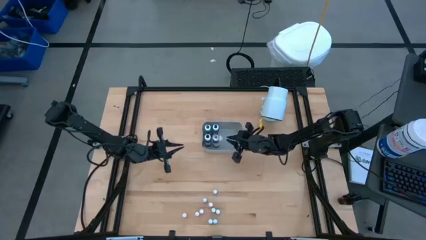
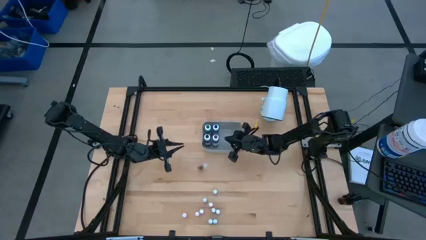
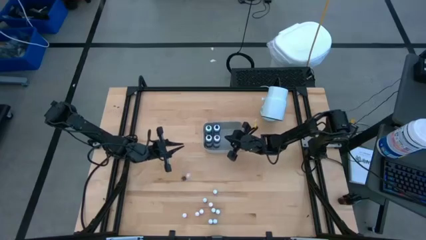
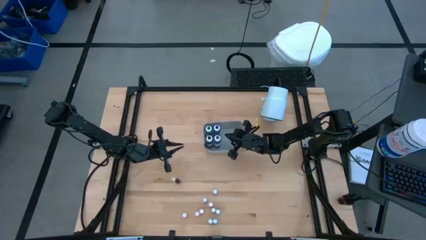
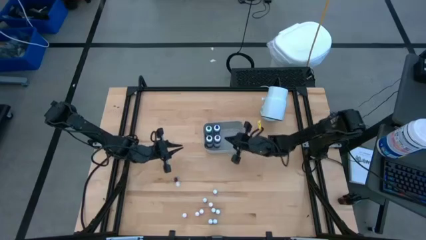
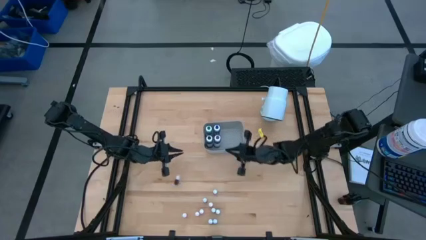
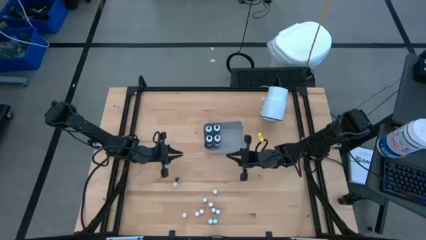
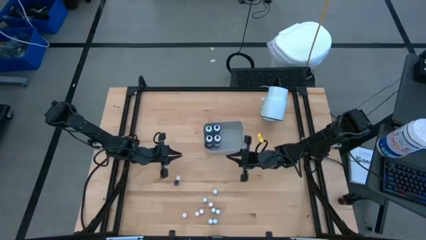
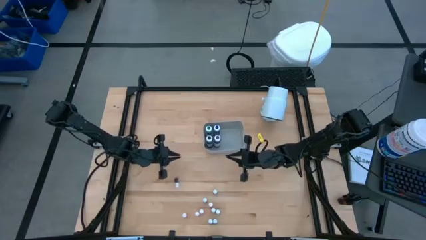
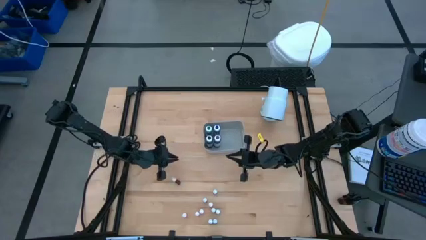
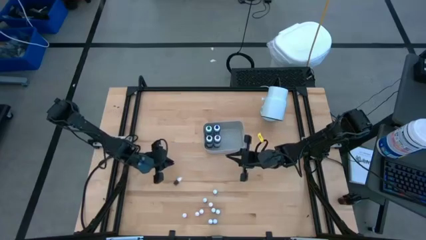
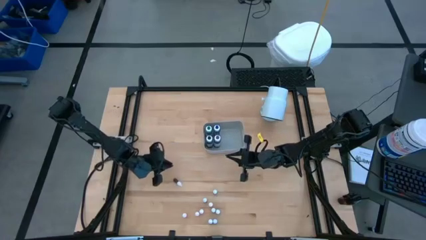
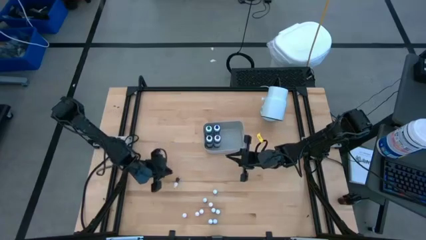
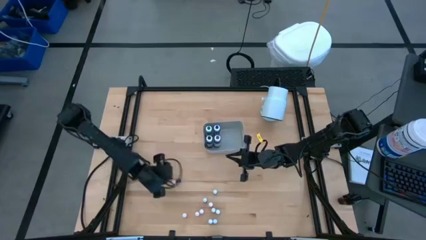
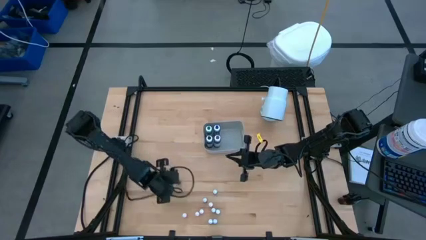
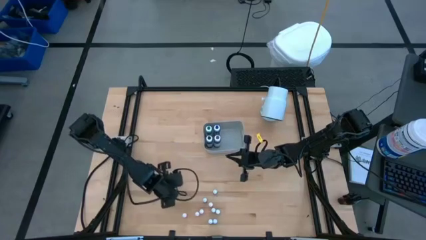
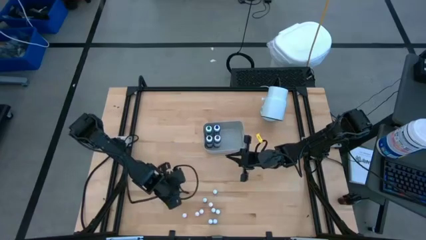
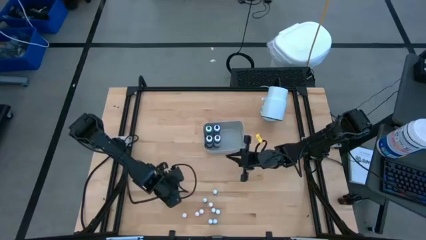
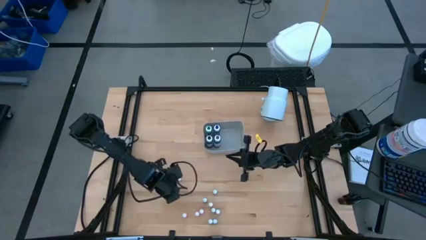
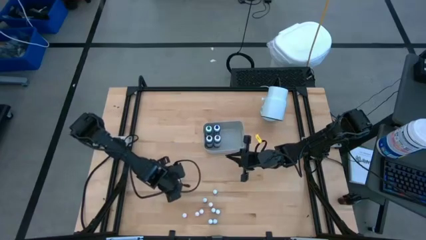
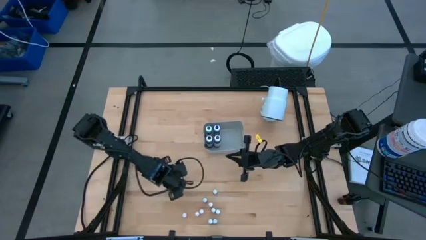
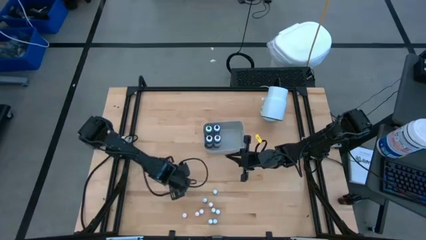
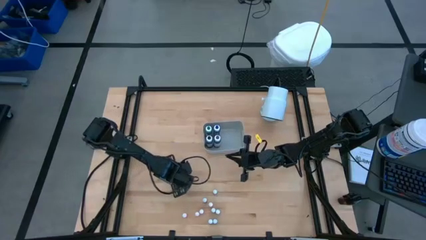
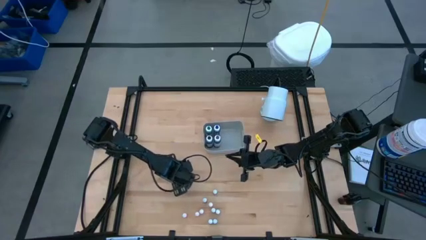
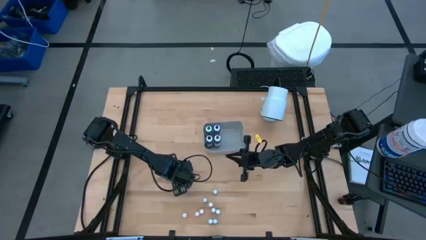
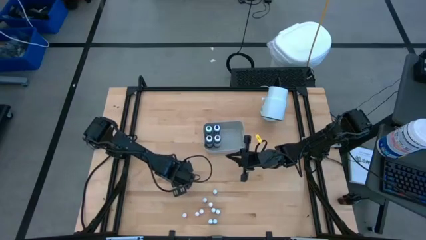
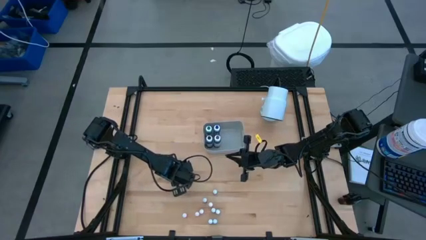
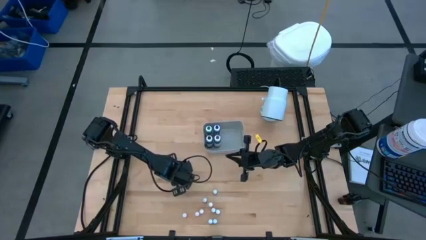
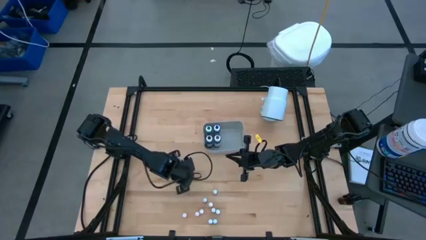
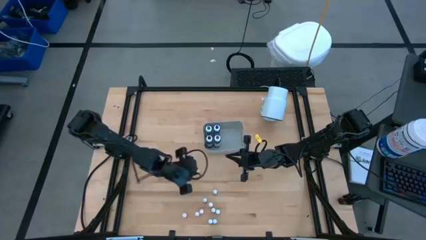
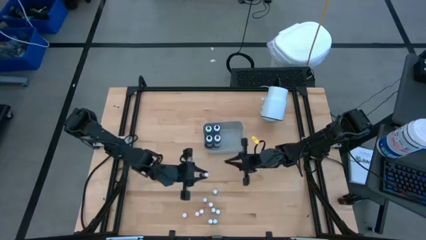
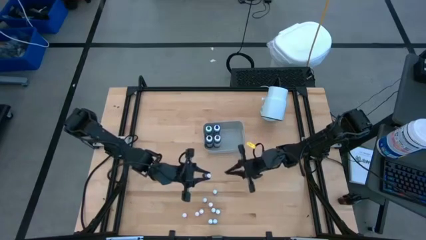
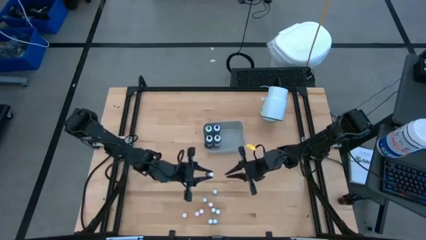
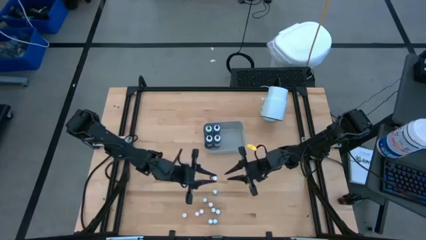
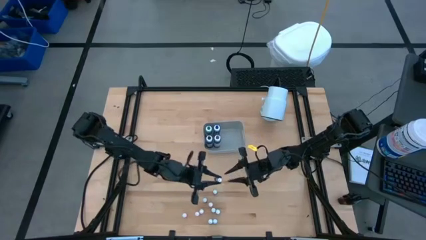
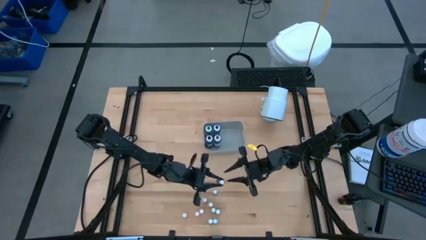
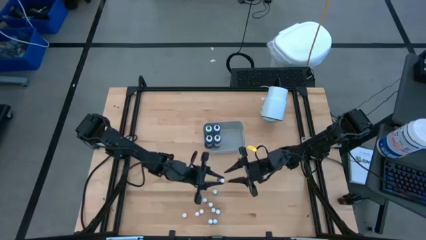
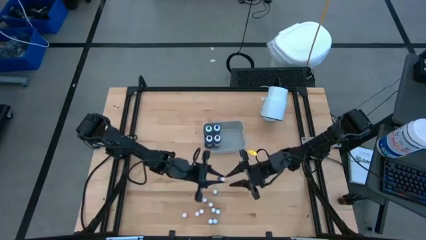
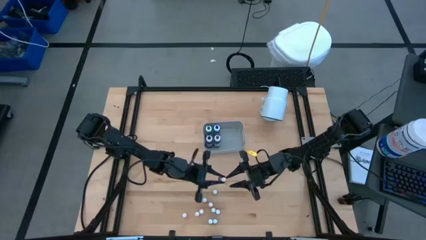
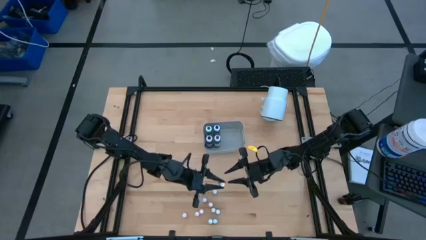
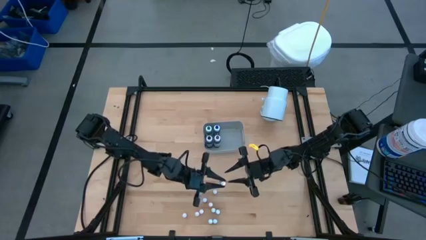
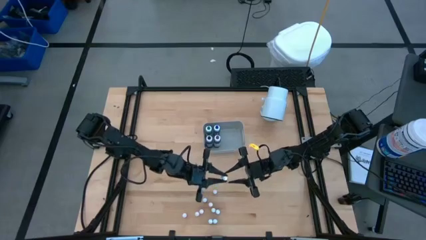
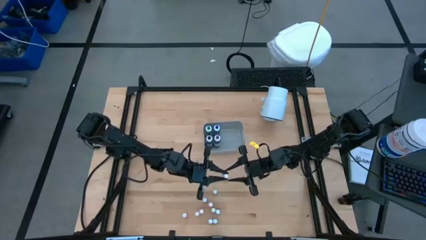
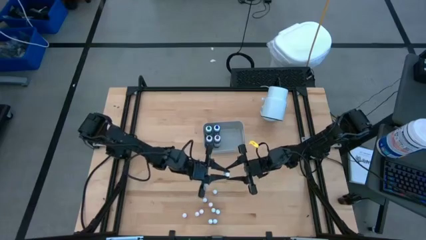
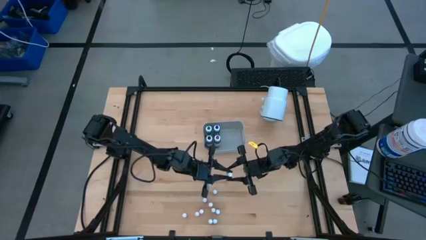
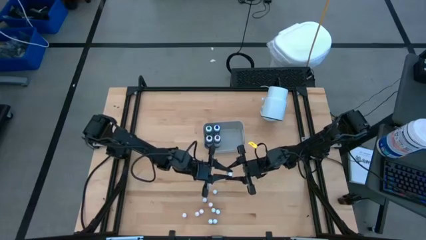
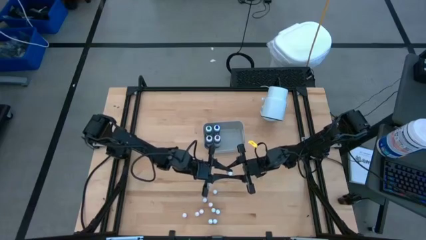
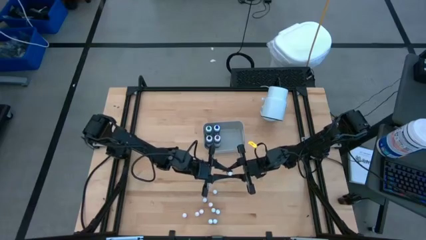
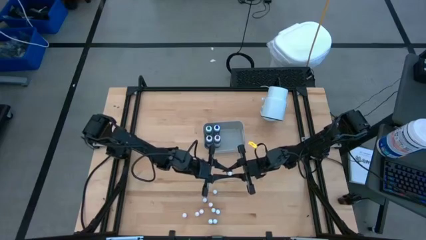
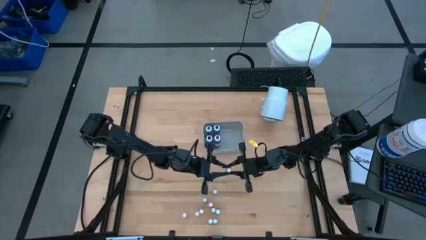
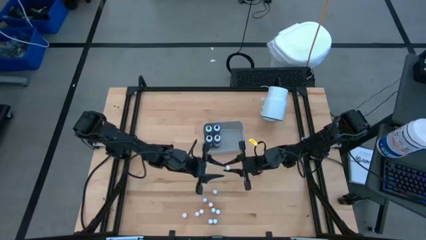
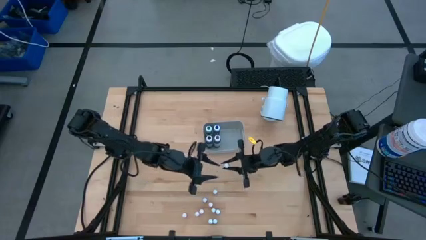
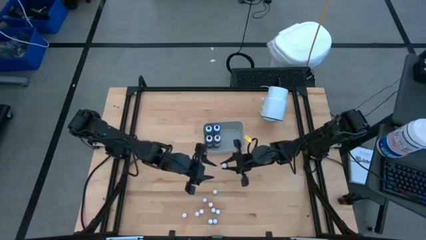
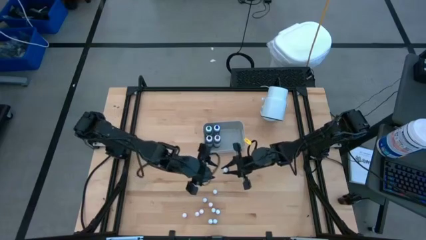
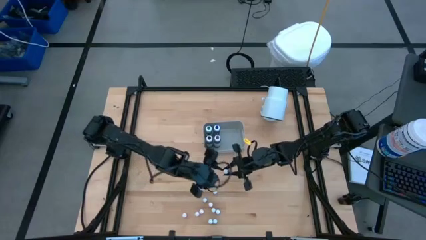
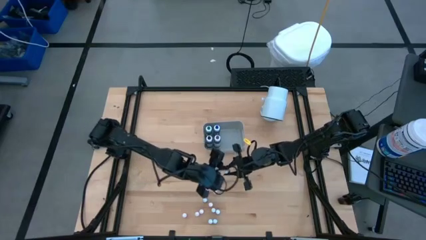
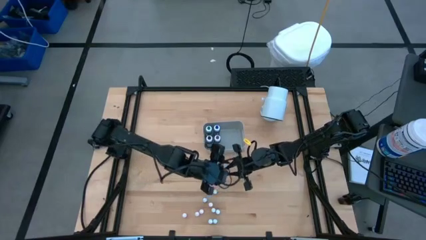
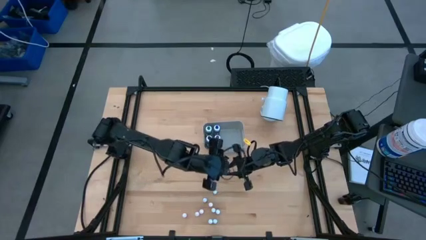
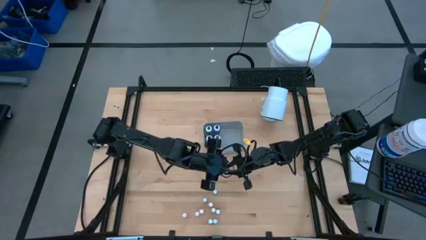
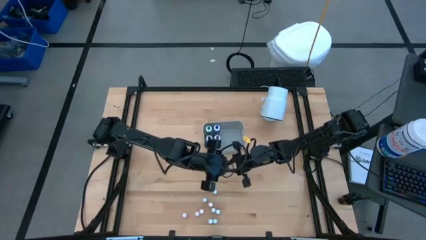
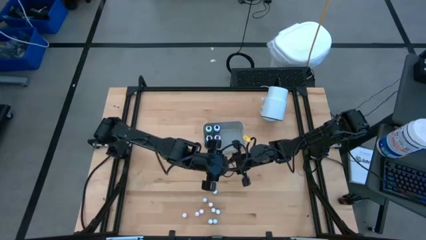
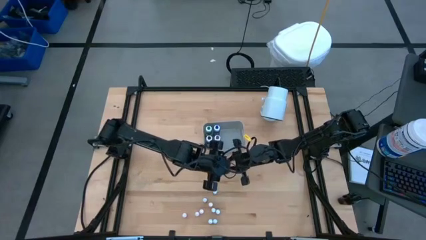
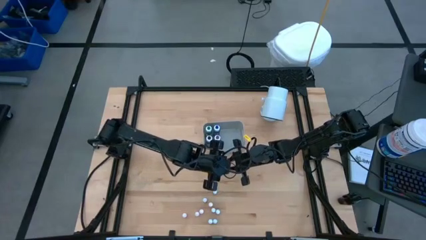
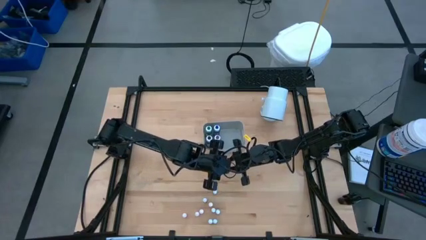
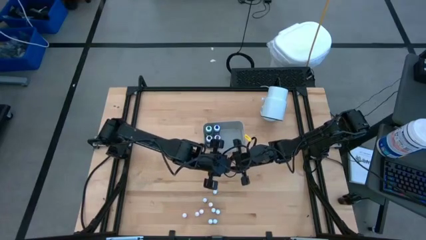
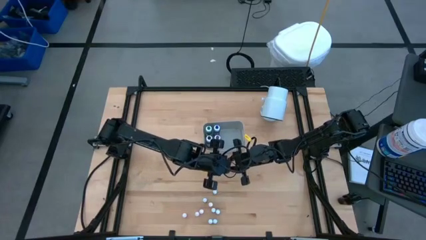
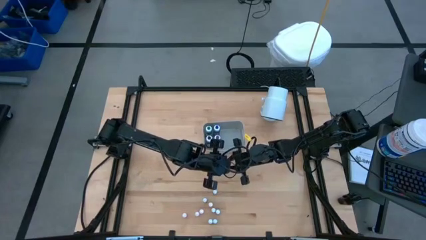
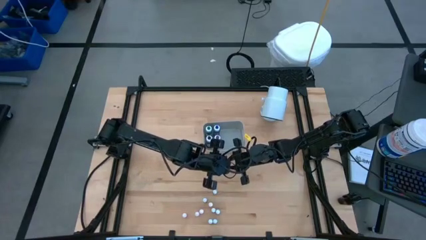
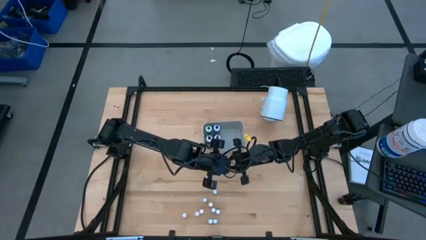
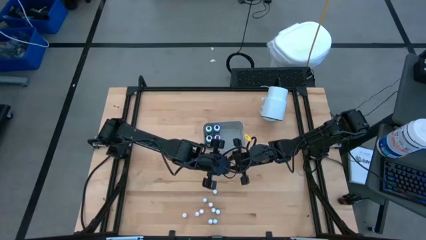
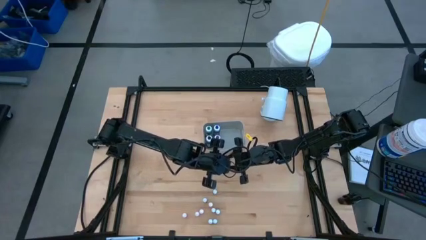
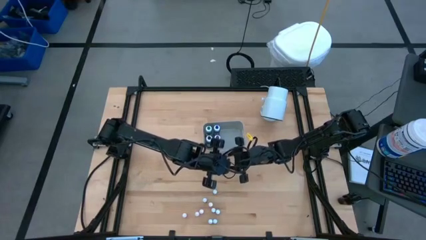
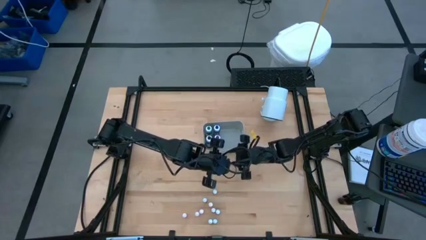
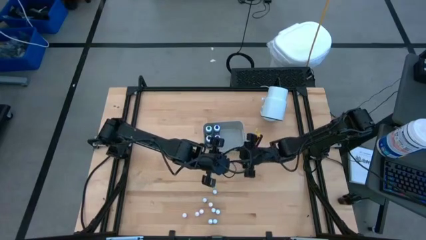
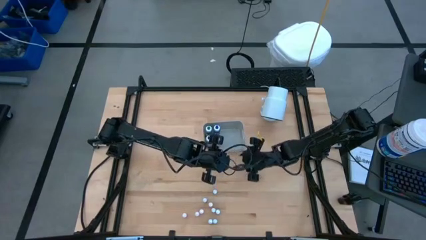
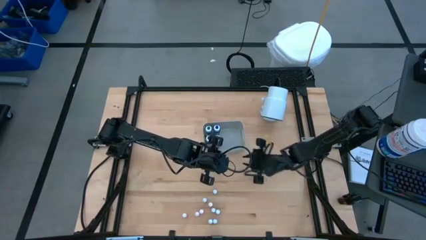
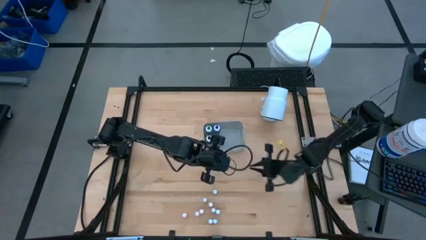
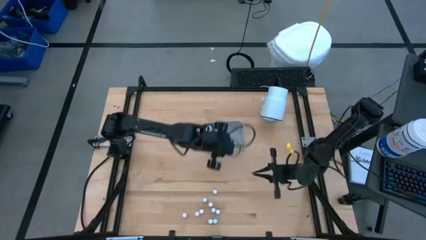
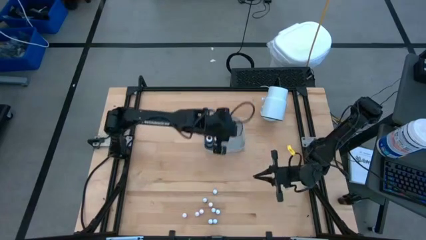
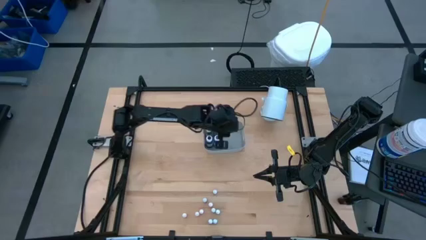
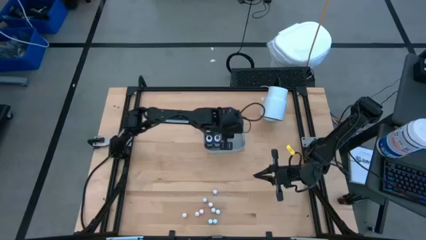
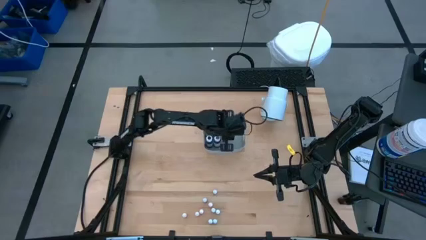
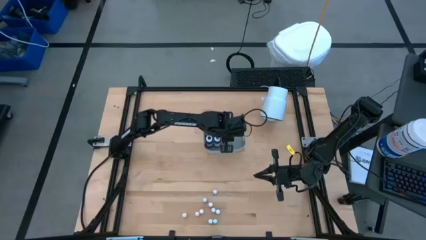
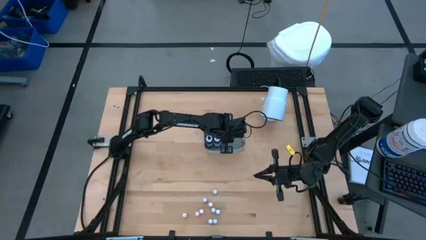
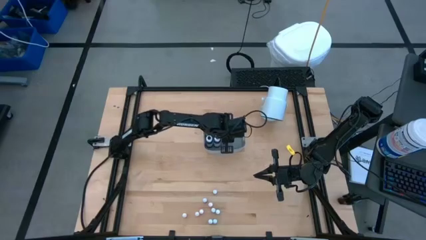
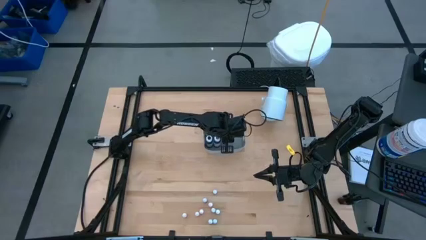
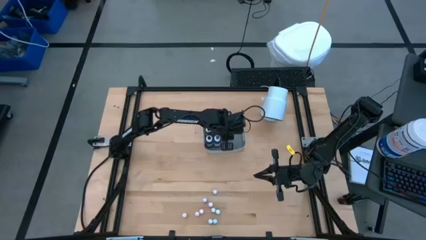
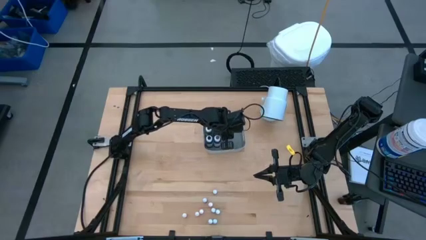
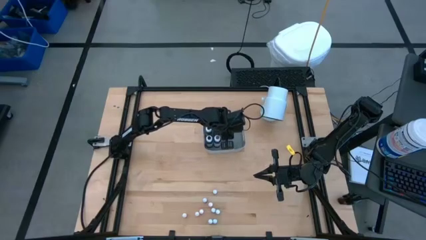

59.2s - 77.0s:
Task: Pick & Place food coloring
Put the small orange food coloring bottle into the gray bin
